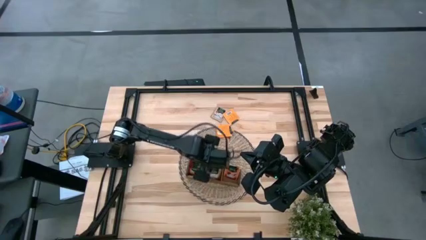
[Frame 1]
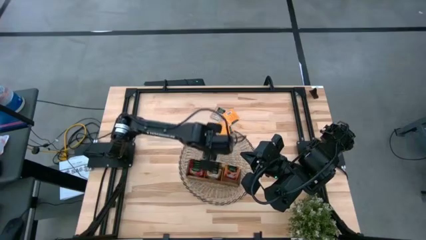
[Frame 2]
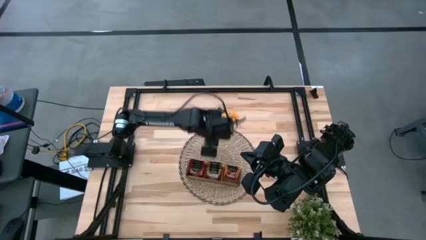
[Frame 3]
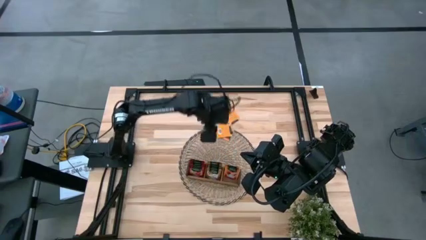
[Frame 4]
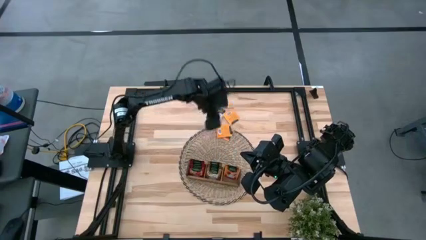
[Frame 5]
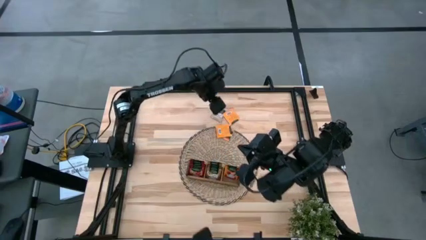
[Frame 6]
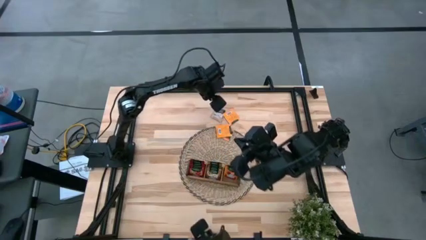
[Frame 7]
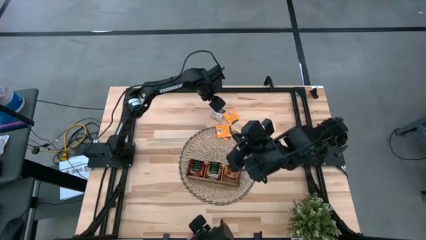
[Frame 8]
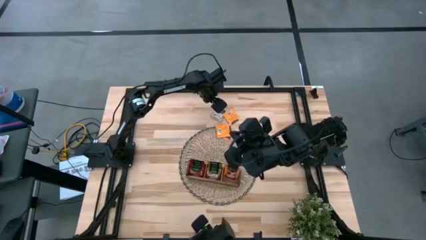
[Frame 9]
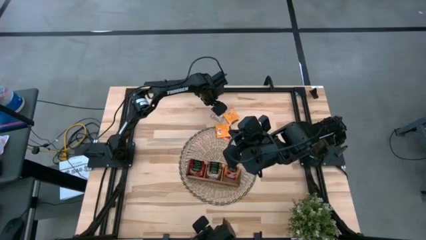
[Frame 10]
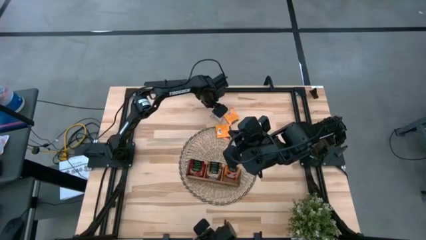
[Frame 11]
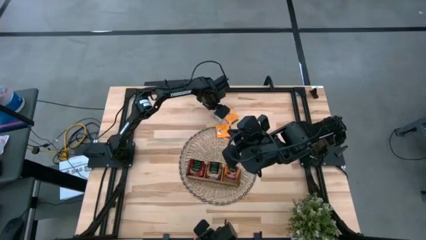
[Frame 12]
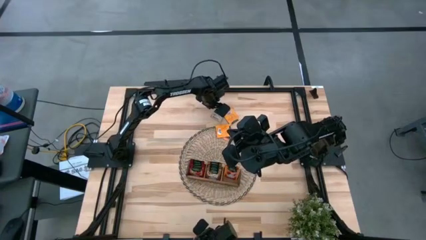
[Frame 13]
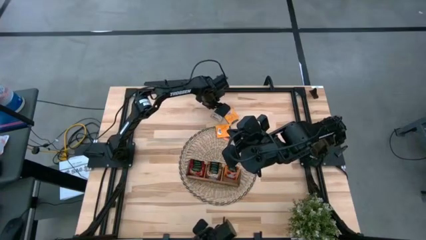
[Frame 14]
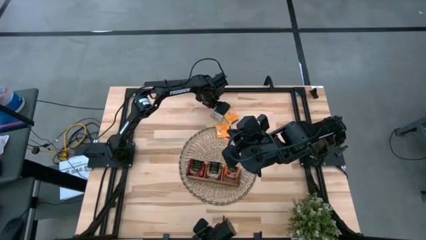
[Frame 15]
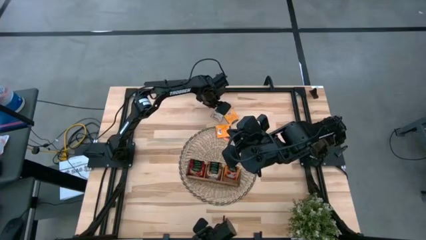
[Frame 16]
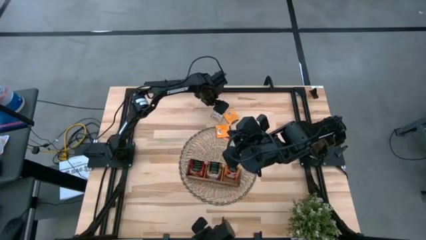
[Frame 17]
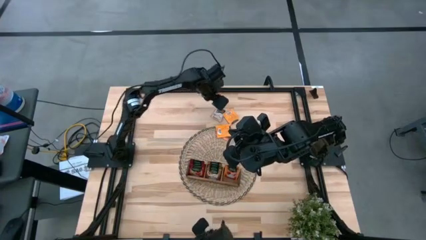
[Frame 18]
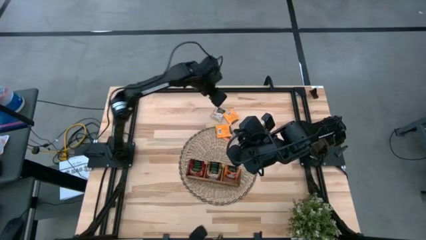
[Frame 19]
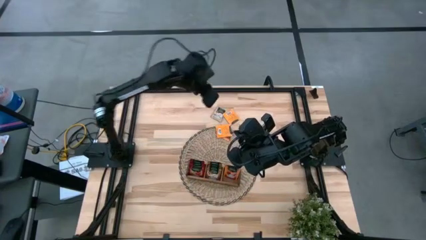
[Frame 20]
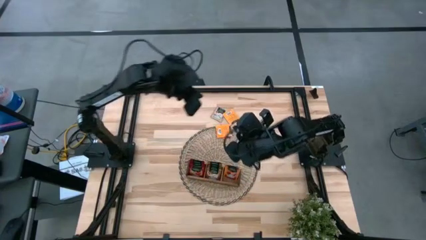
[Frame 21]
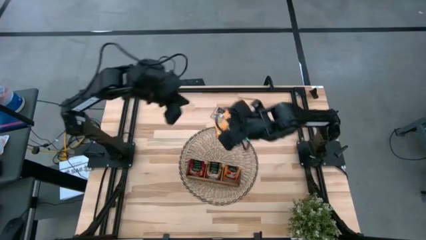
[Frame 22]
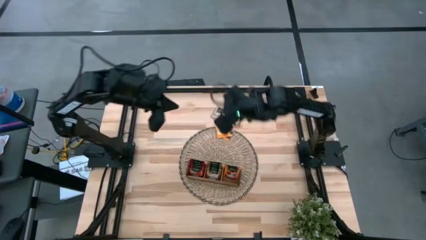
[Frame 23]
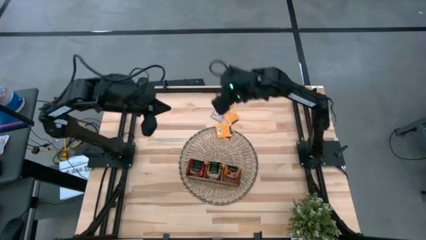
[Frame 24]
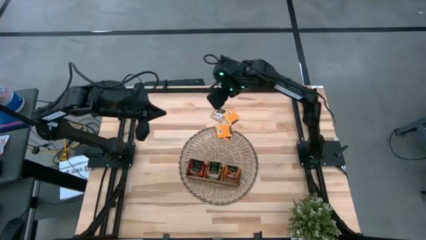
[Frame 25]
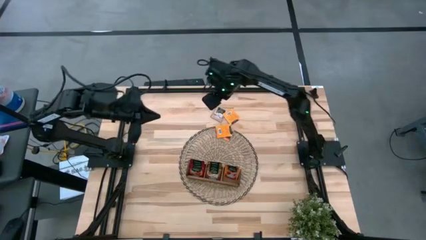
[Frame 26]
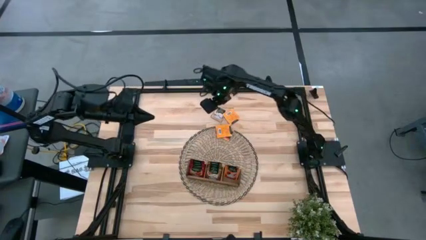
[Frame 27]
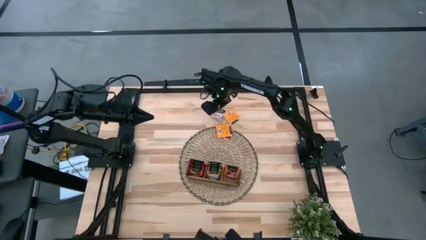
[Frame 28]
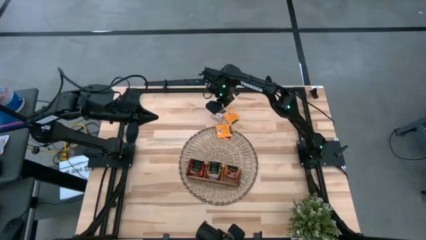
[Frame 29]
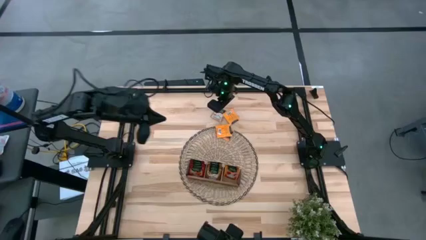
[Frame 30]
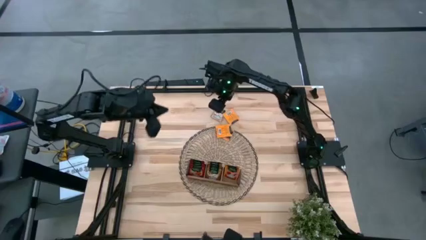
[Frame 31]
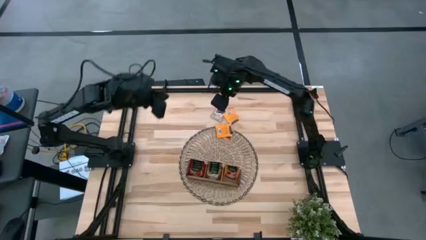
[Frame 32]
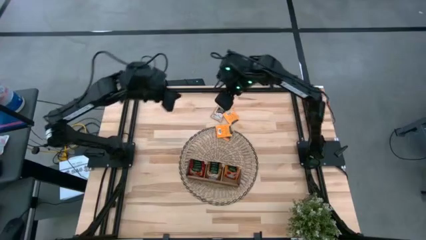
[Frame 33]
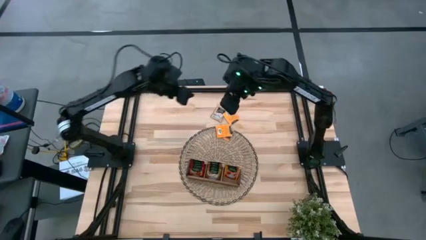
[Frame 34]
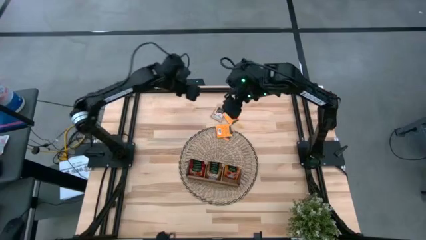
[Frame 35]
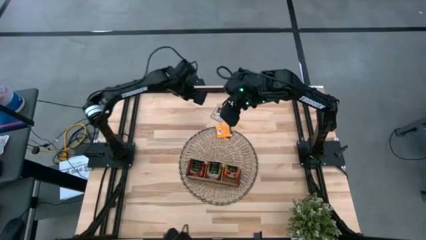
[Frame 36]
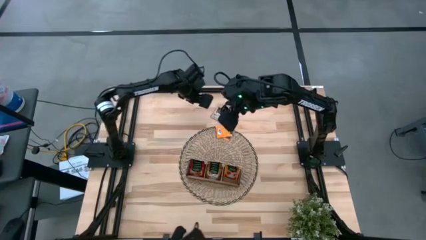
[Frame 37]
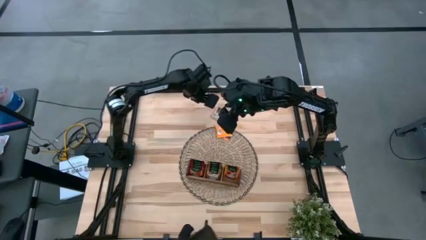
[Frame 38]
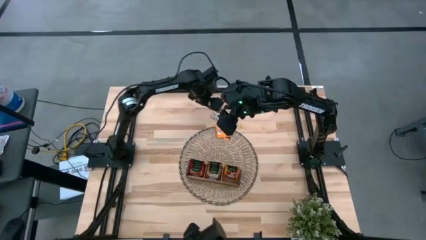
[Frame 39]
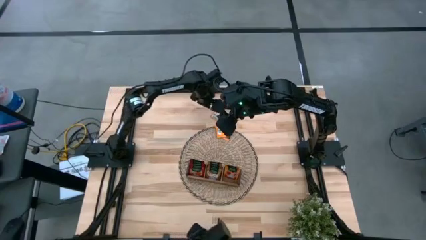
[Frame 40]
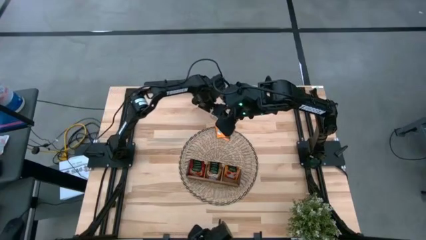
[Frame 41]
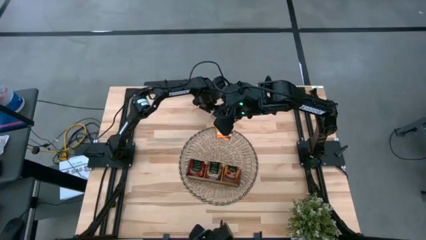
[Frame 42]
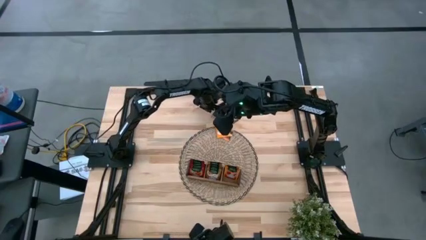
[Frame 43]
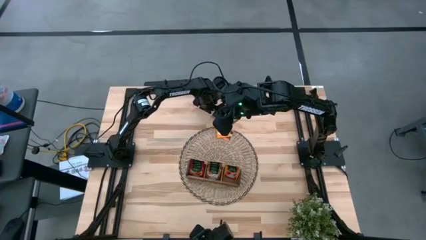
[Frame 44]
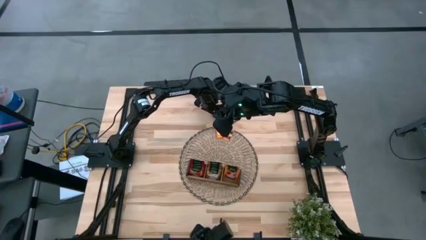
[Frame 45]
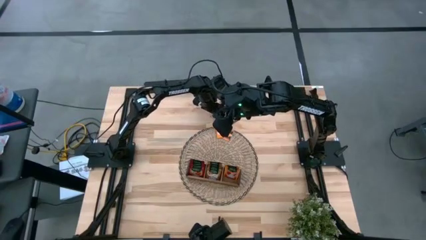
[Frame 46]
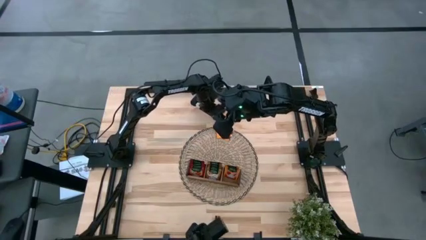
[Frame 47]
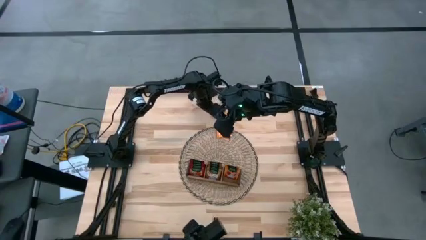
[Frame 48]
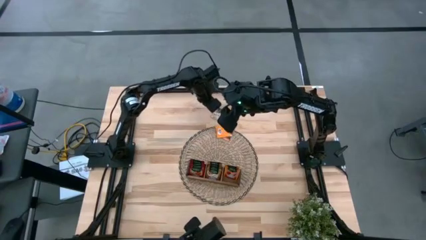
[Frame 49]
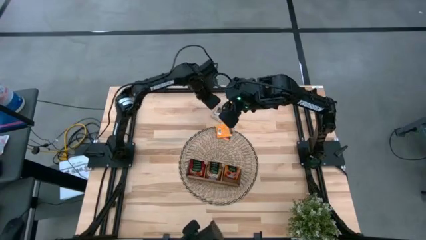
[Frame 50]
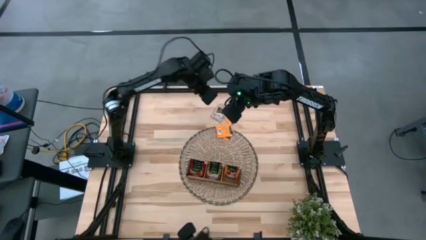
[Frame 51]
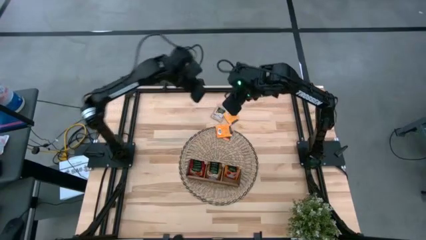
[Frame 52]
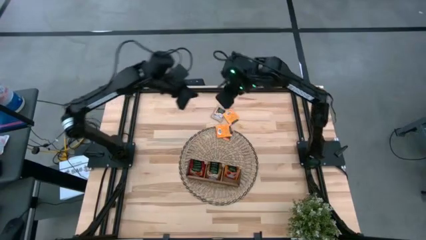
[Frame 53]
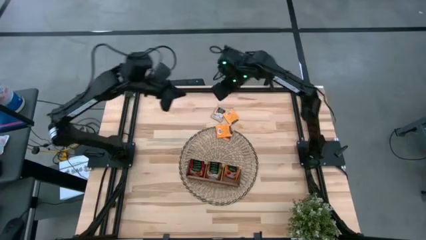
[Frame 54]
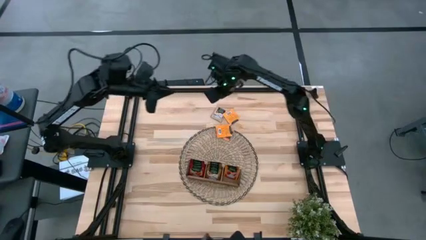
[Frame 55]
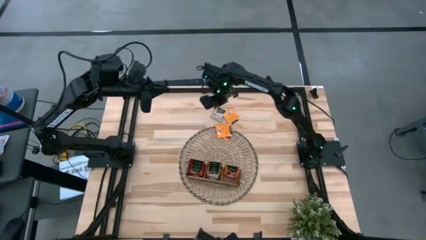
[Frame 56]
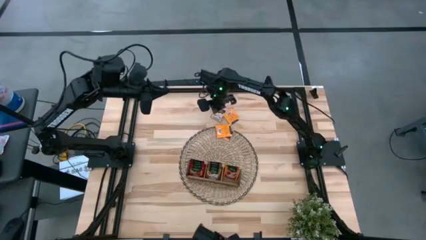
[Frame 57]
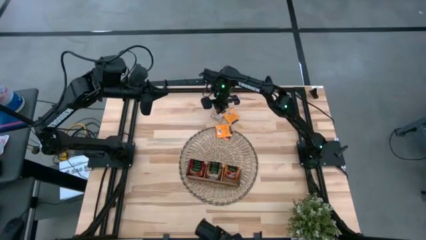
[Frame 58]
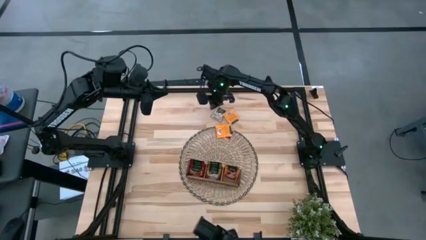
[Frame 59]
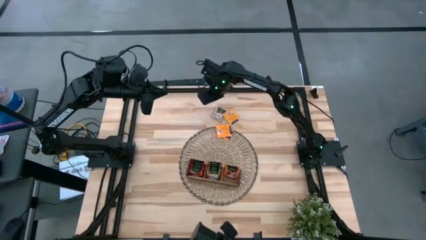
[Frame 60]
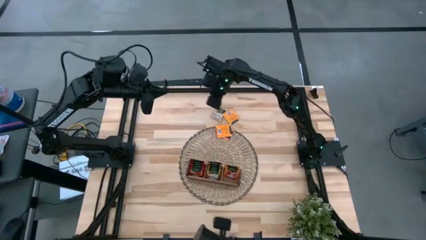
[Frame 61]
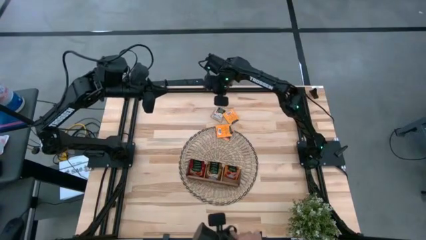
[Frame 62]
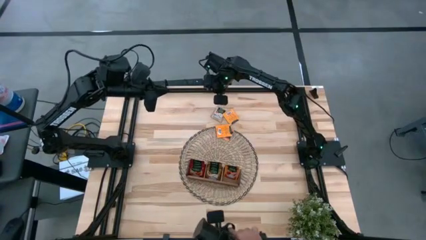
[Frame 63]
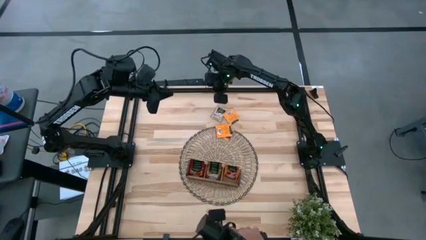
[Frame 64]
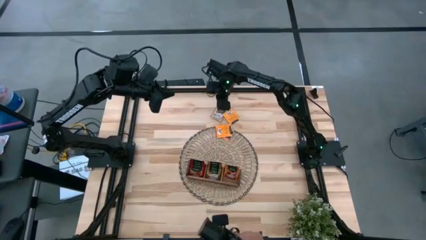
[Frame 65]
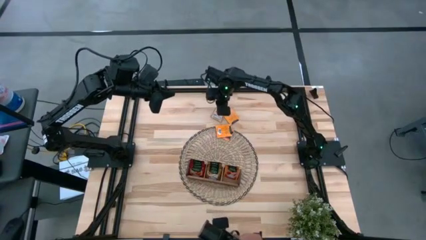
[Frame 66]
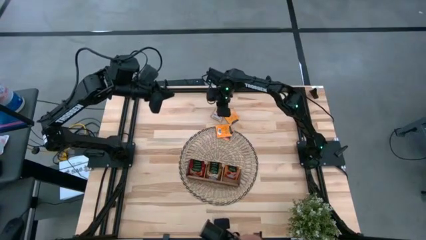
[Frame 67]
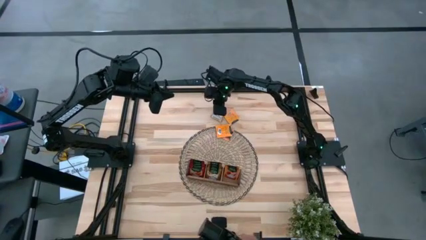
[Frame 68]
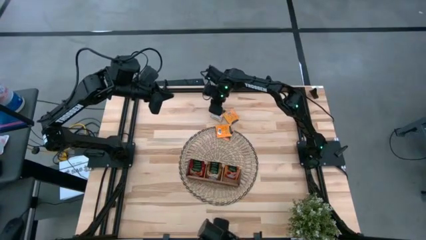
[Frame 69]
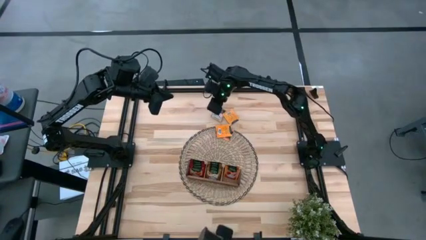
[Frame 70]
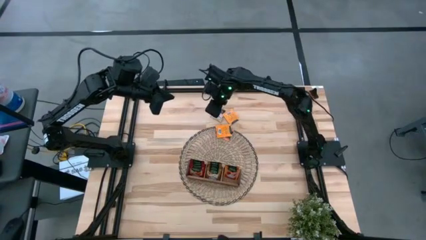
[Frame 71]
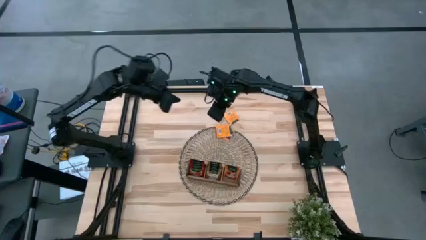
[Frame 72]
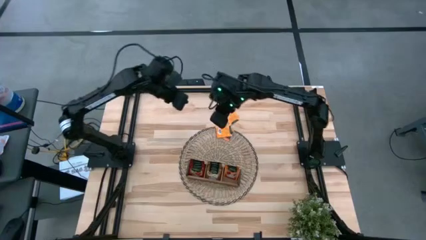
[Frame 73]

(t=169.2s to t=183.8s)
Task: Pick & Place Tea
Put the orange tea bag into the right section of the wooden organizer

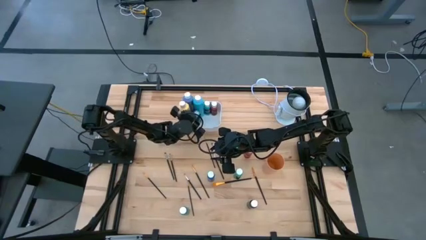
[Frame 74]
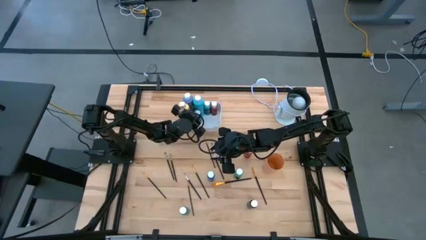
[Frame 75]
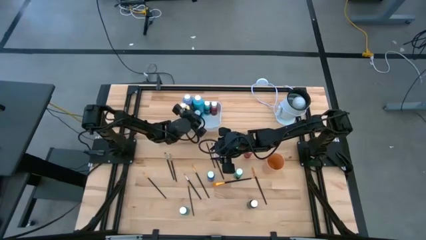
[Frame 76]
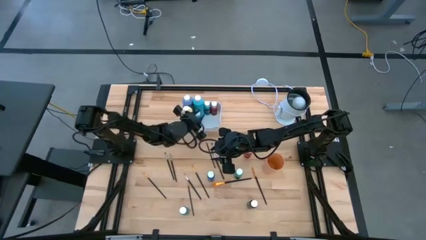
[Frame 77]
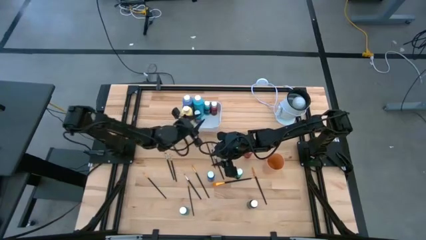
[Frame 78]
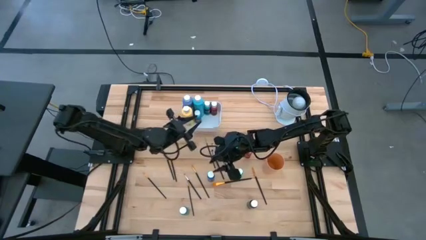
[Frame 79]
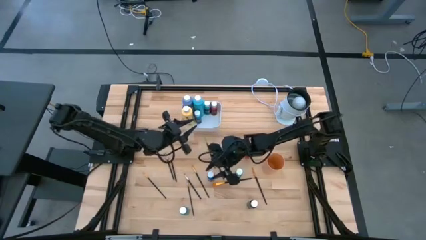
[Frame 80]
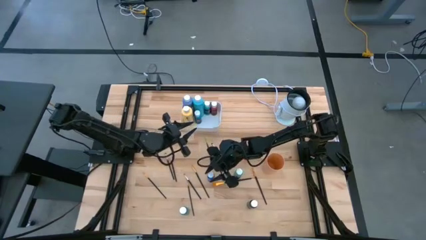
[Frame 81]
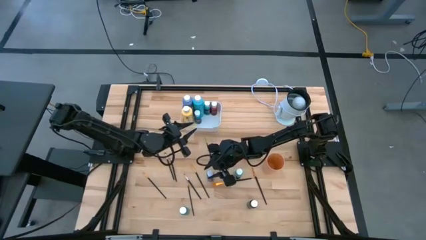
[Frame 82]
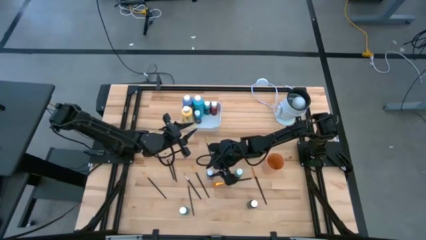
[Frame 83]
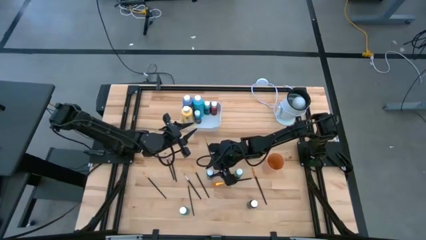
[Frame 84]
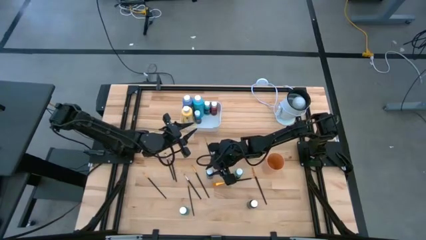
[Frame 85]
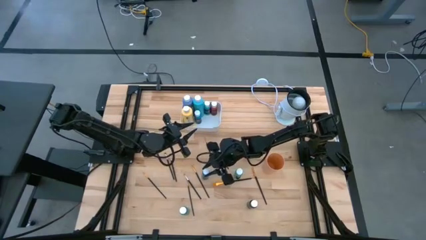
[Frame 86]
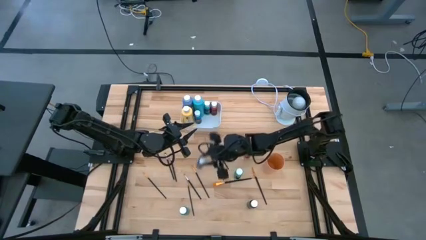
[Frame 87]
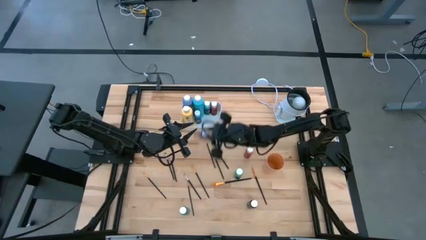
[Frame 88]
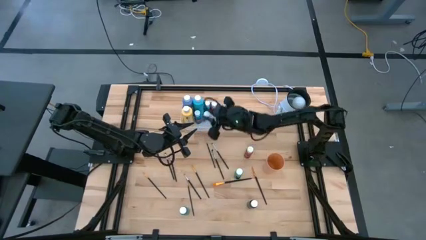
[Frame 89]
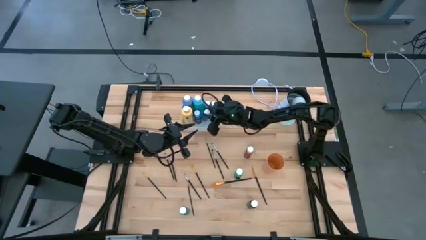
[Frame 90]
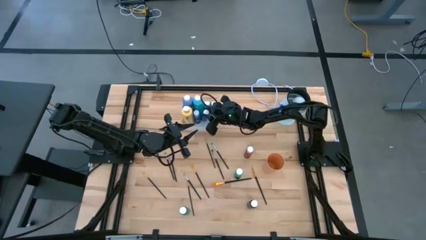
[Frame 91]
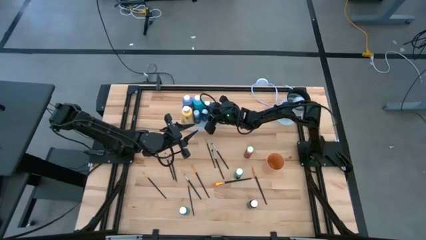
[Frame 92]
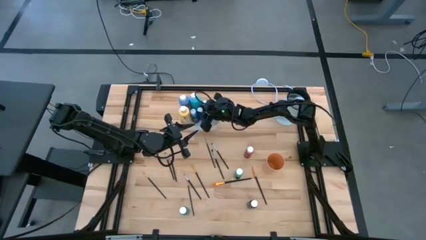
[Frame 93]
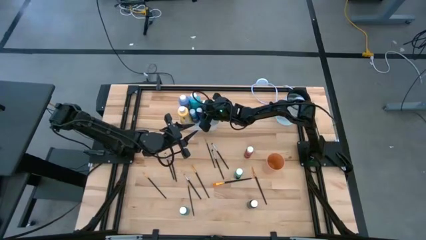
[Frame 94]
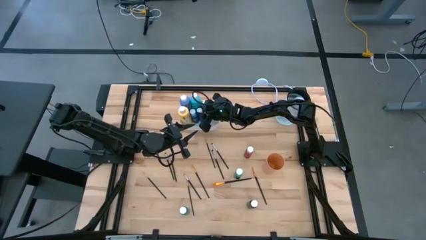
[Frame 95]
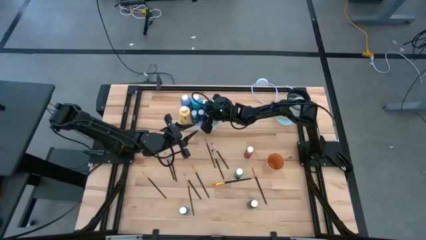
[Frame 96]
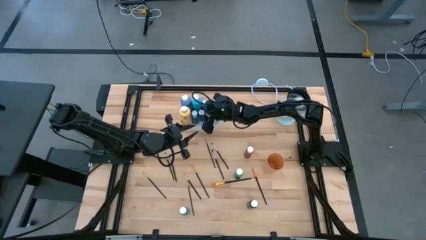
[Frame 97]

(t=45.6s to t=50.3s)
Task: Pick & Place Paint Supplies
Put the blue paint bottle into the white bin
